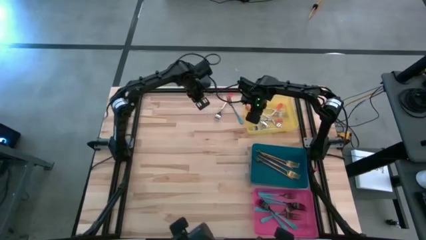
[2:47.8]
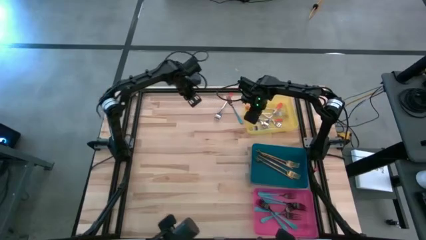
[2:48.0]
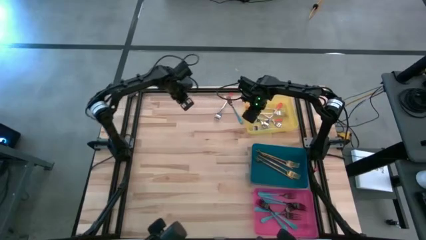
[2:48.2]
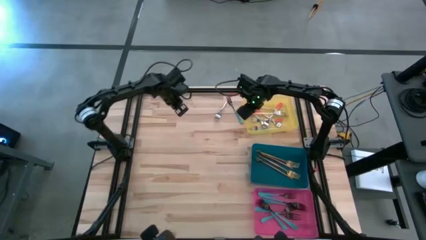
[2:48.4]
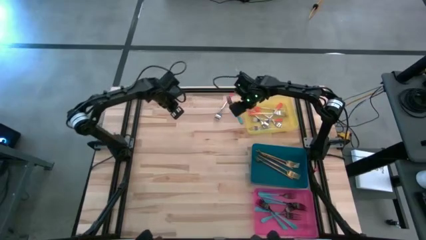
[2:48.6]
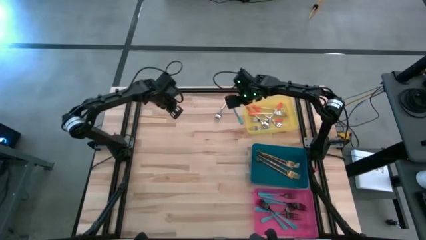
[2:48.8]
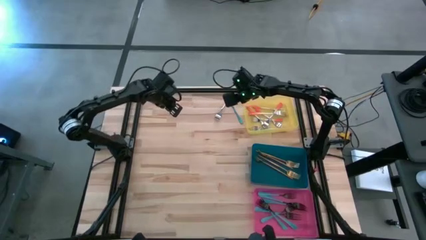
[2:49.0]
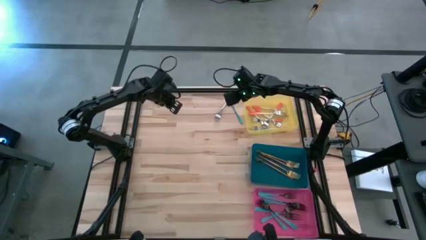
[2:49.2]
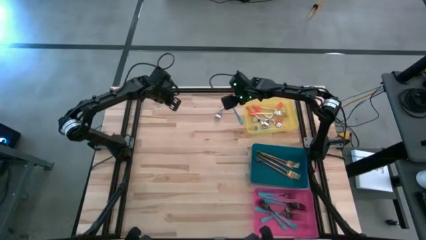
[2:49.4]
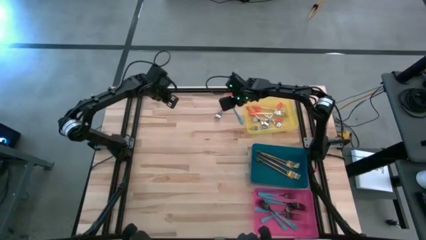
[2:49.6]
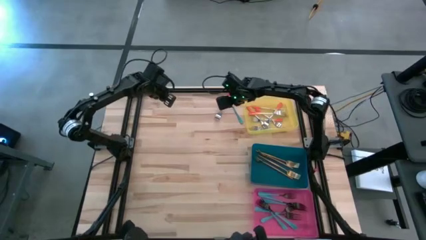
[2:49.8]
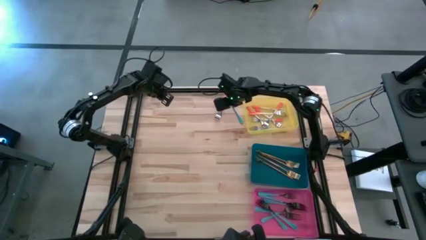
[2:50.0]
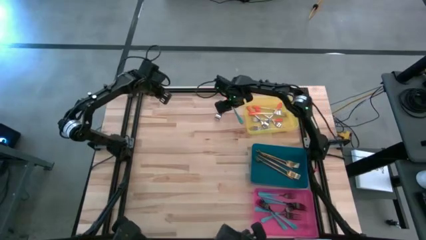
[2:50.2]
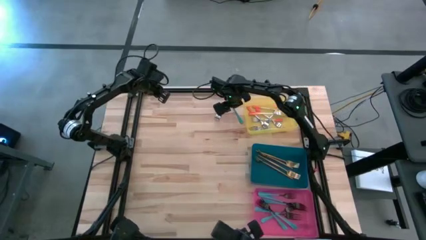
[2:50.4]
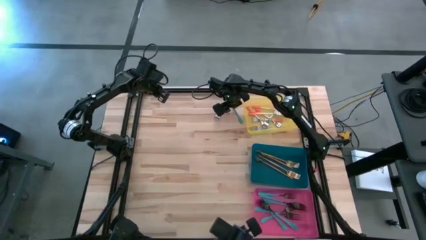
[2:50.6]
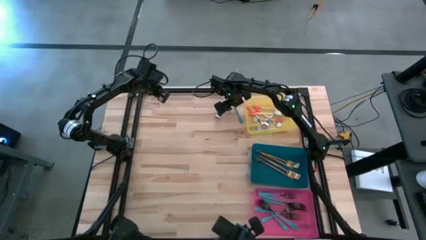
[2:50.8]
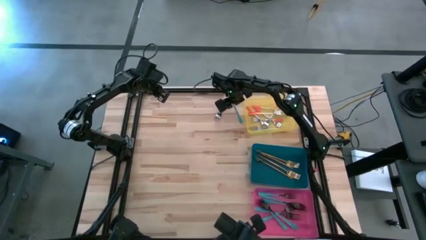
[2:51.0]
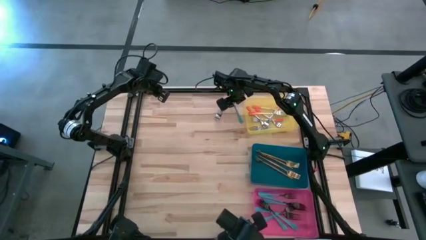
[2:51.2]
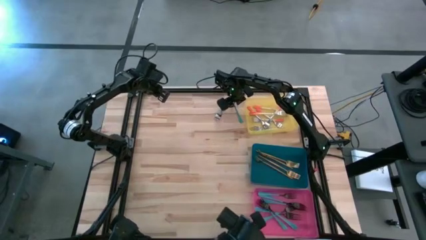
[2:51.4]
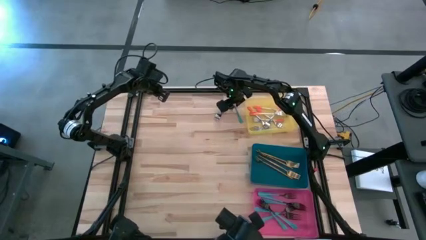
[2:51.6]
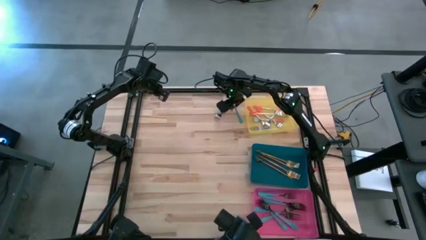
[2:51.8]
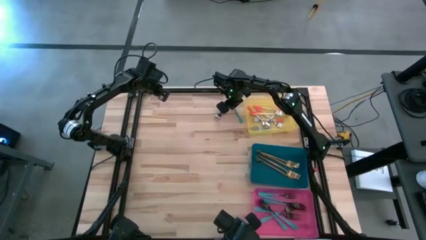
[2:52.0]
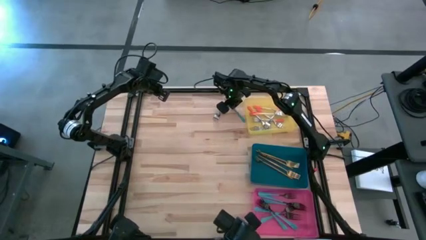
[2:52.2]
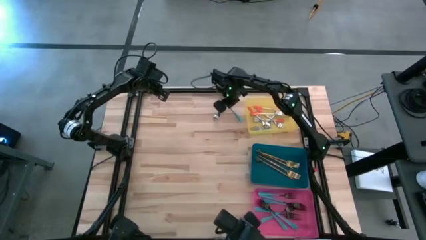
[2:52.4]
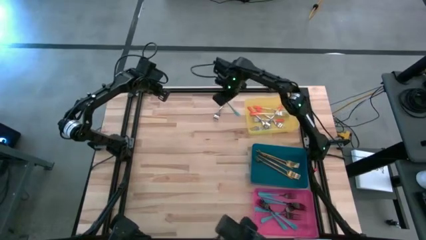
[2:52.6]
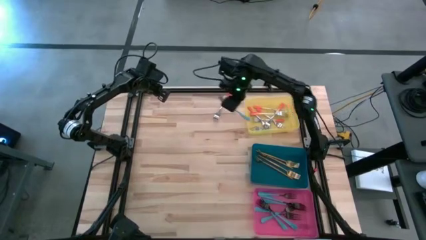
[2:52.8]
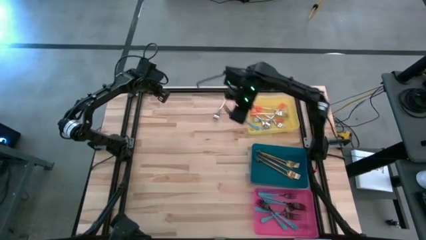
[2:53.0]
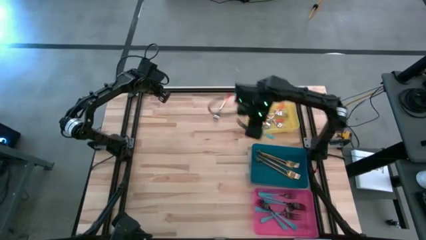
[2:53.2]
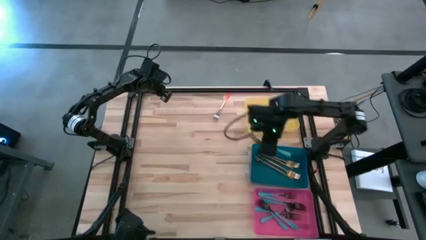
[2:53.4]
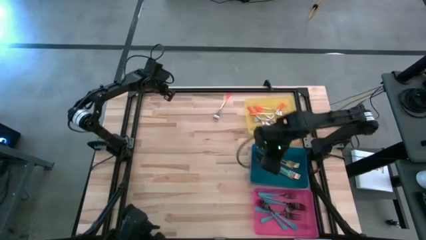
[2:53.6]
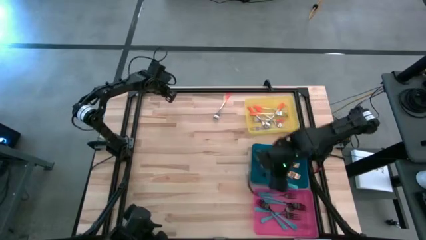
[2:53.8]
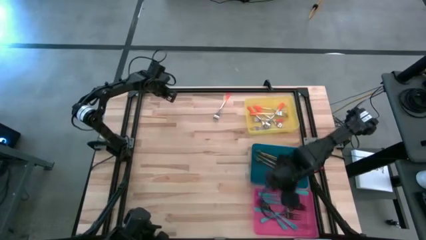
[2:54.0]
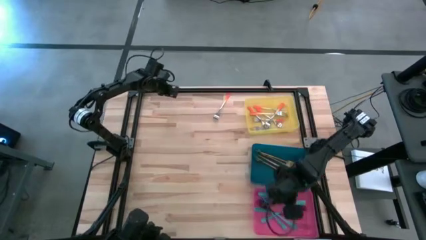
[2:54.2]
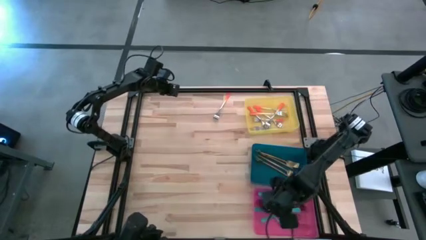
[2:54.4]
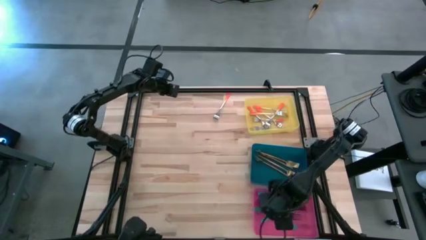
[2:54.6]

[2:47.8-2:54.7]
Task: Sort silverware by color (type)
Put the blue fork into the pink bin

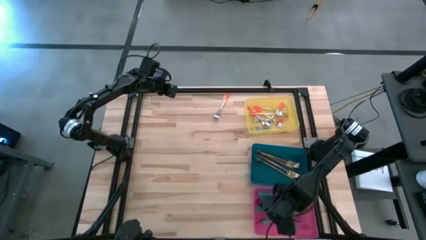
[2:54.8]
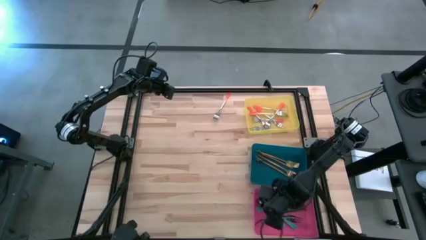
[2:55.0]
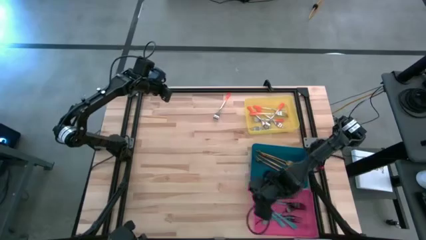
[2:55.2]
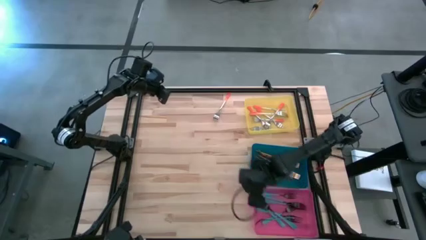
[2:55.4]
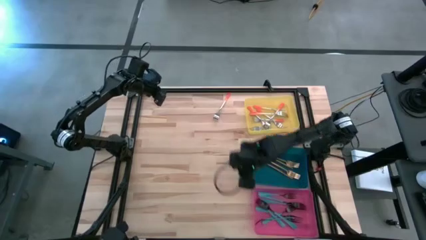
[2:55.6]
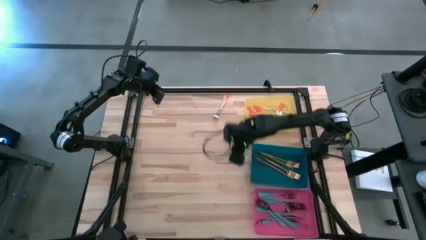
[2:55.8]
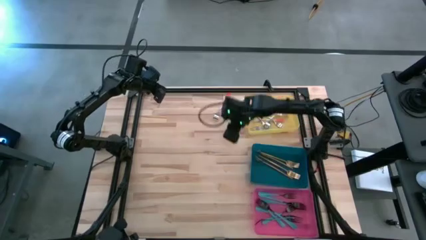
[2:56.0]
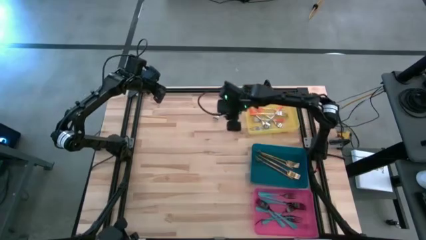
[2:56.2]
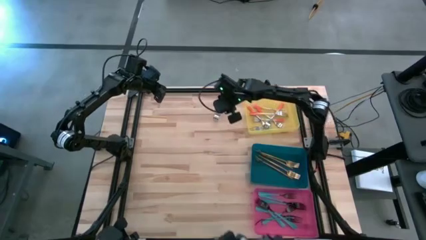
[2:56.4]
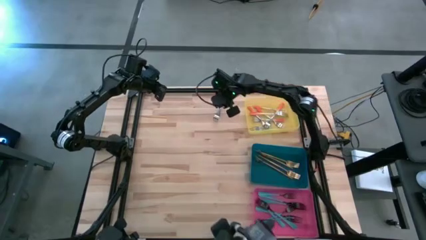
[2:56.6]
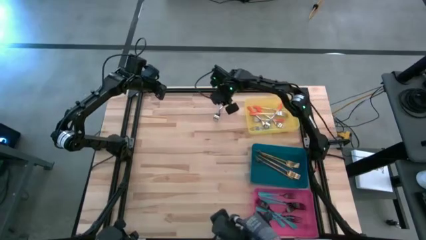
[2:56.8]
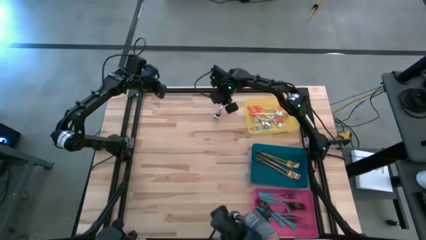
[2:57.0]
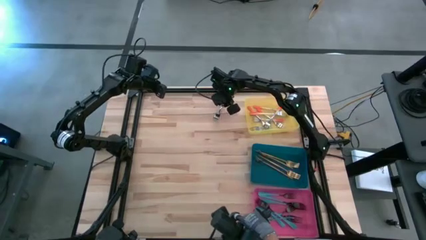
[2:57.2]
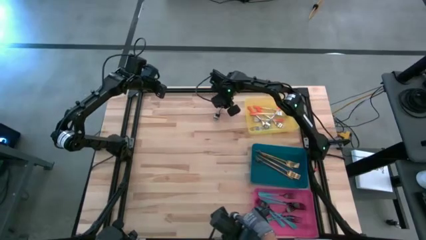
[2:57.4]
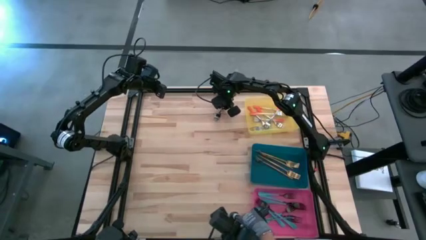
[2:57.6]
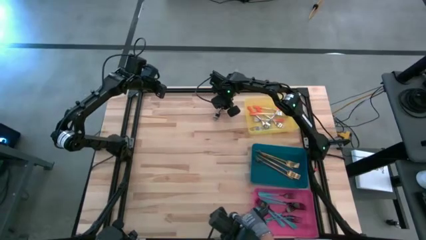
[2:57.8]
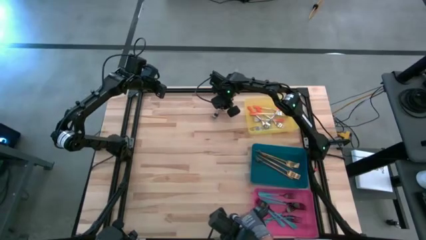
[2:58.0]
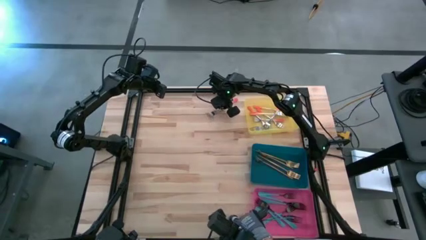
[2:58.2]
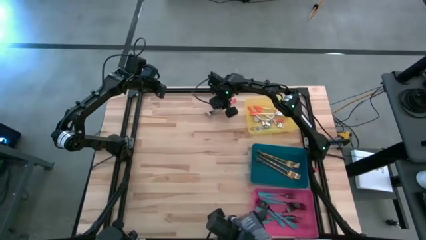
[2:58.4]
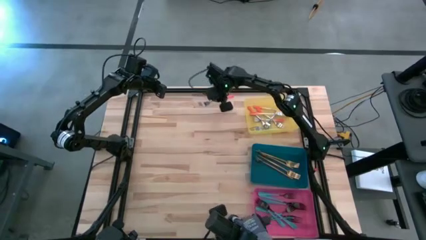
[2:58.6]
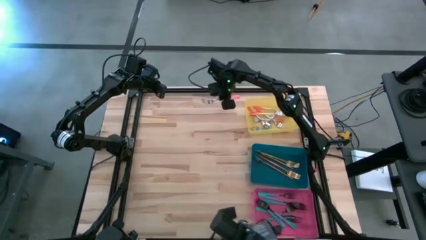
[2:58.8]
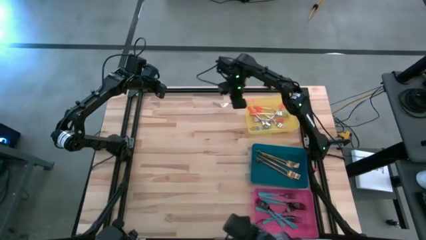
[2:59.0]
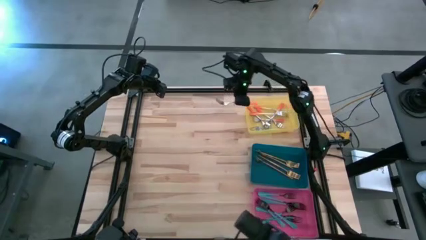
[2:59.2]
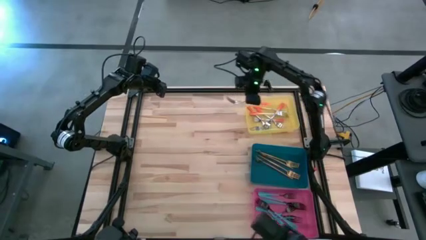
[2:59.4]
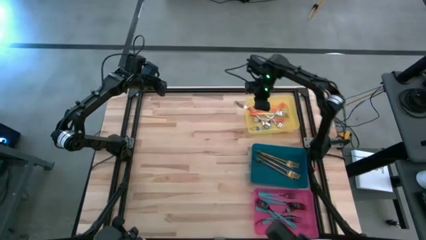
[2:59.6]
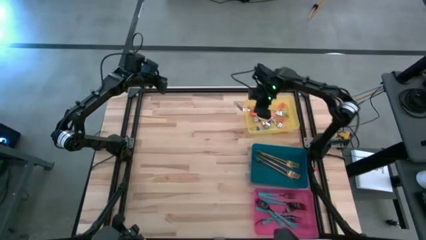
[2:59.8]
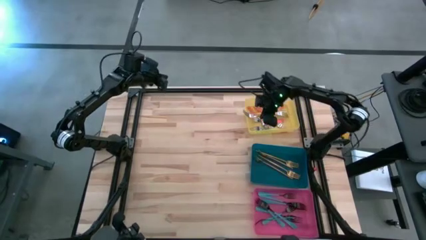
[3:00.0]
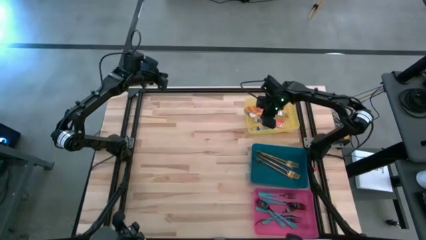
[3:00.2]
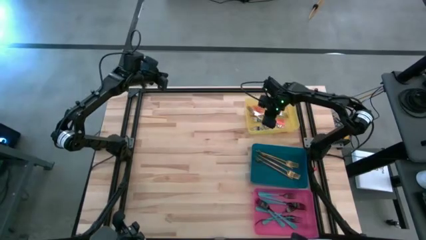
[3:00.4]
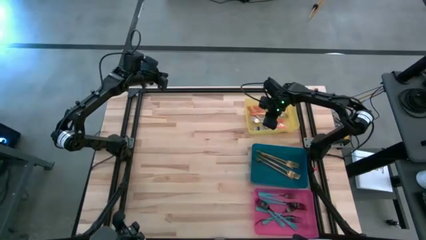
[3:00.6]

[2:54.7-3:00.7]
Put the orange fork into the yellow bin

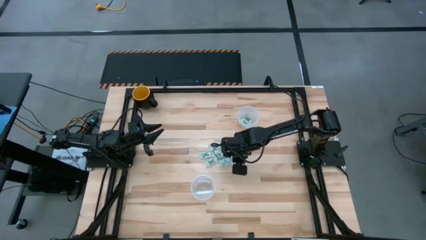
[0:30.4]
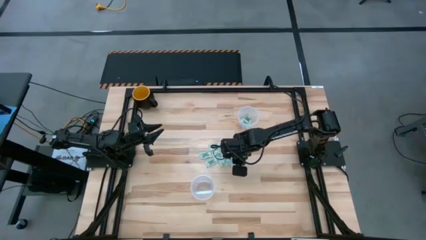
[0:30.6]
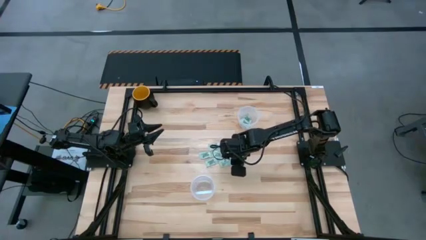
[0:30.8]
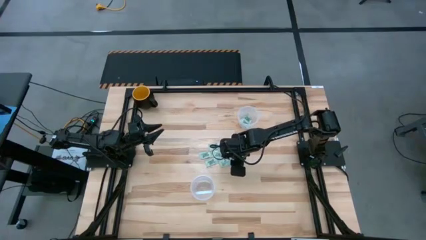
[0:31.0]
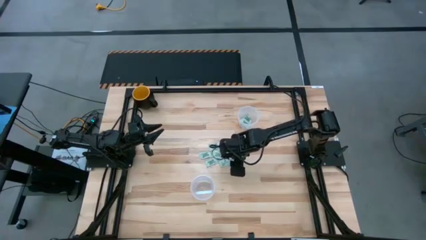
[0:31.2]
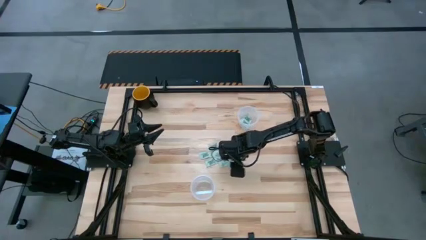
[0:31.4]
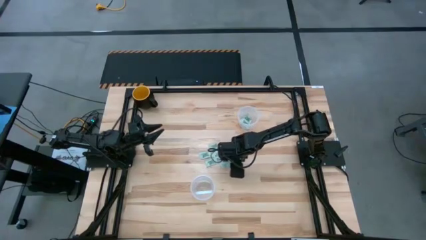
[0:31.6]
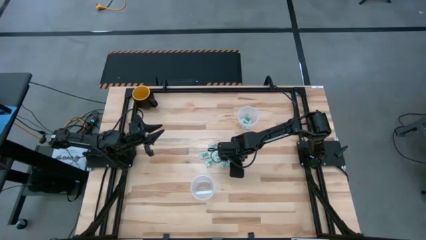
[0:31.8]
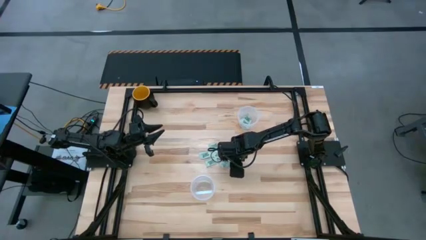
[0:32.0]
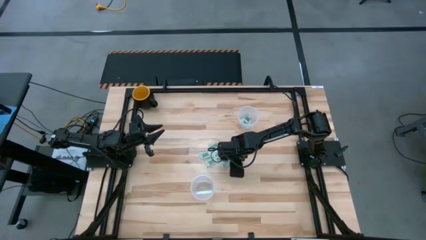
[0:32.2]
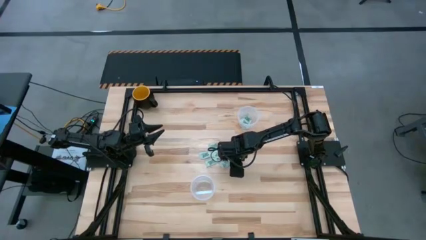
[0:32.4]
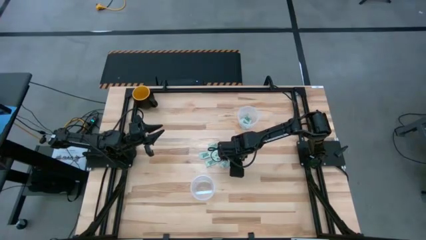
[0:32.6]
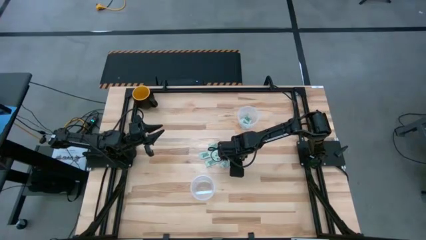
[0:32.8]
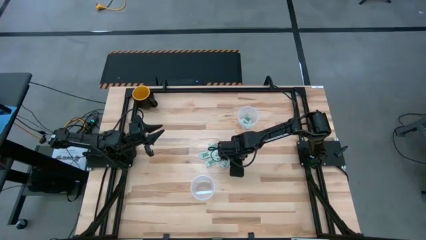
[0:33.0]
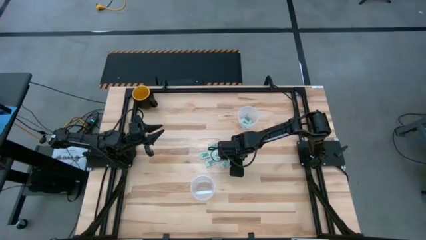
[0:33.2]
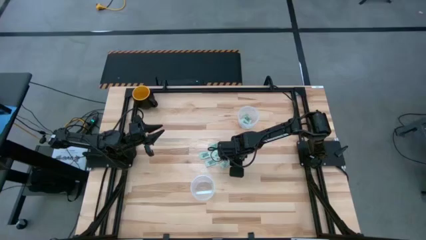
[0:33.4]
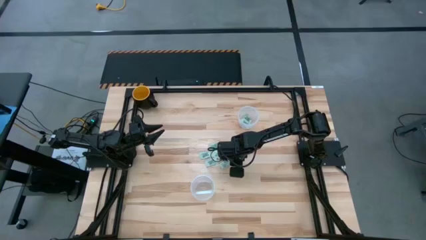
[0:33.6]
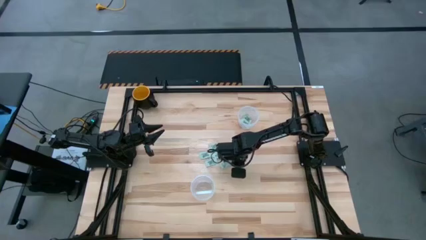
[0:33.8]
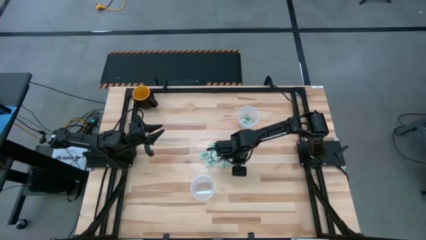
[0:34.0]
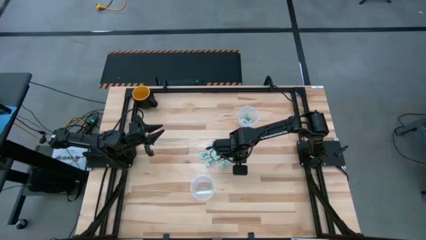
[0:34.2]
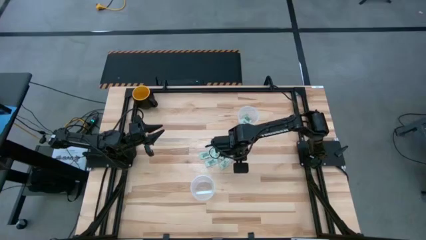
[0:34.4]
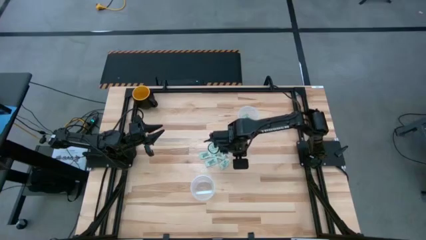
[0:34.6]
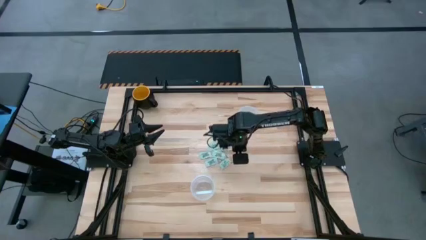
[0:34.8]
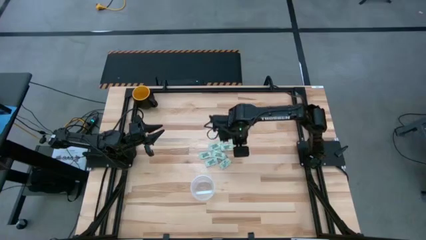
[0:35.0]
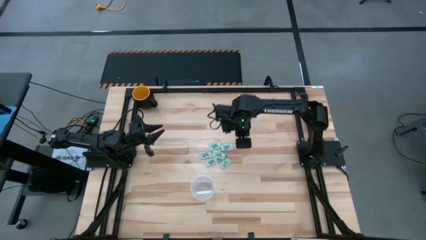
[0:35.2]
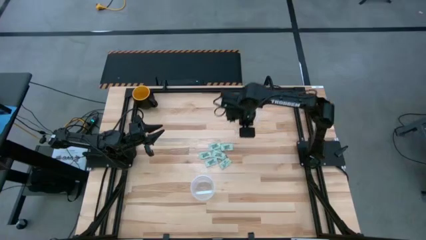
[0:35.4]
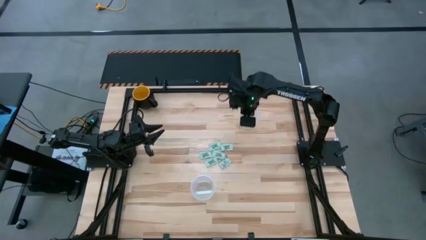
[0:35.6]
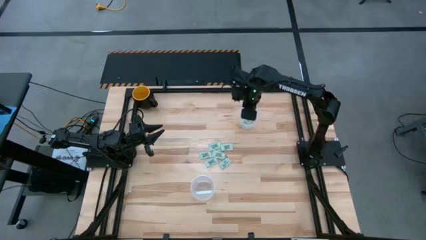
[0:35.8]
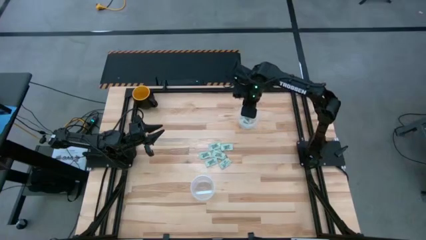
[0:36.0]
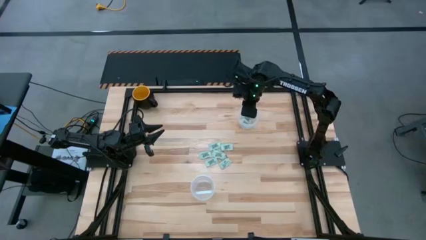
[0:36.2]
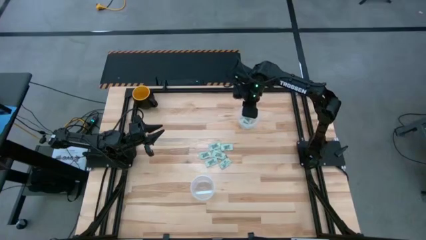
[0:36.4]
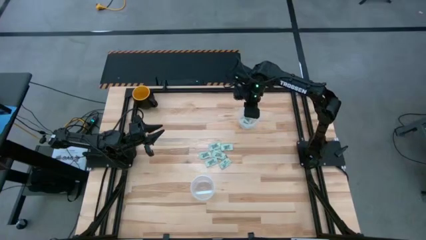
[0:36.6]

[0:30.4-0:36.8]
Task: Pick and place Stevia / Truvia into bins
Put the stevia packet into the top transparent container
